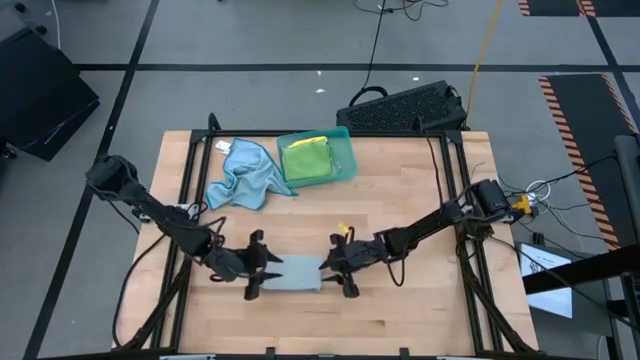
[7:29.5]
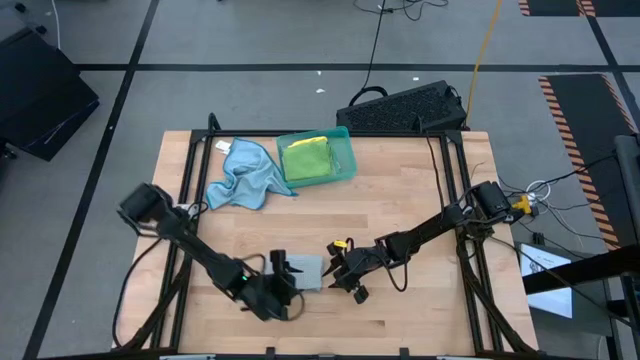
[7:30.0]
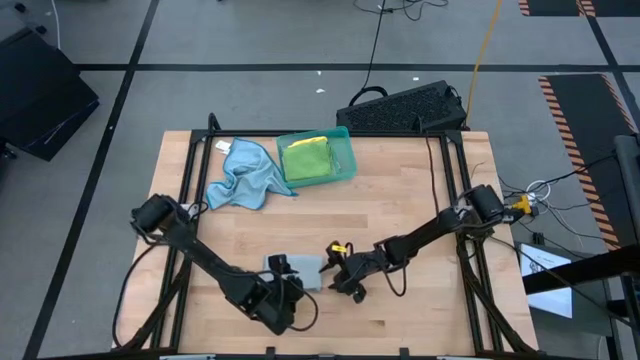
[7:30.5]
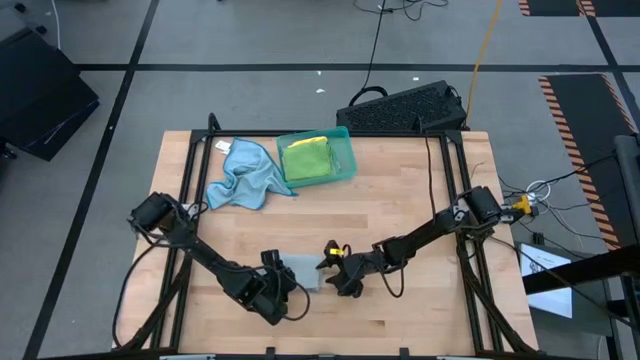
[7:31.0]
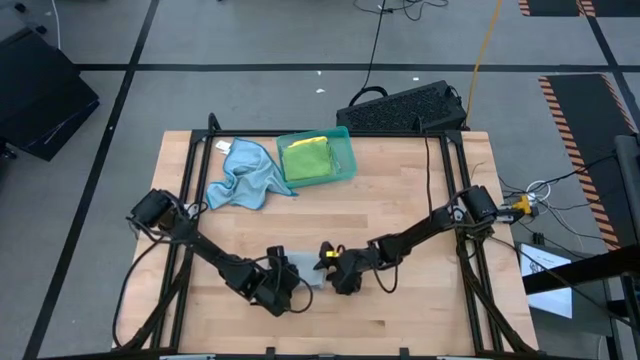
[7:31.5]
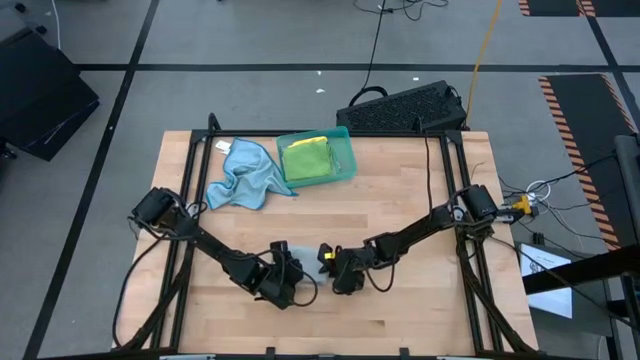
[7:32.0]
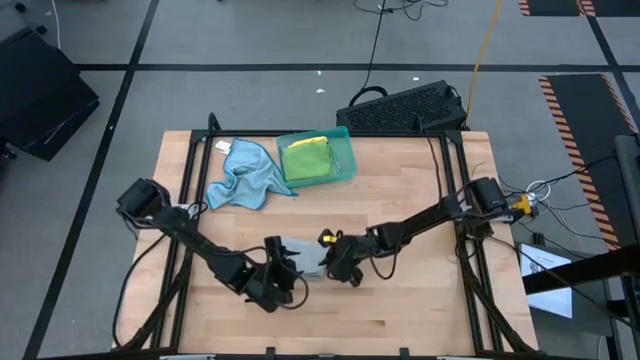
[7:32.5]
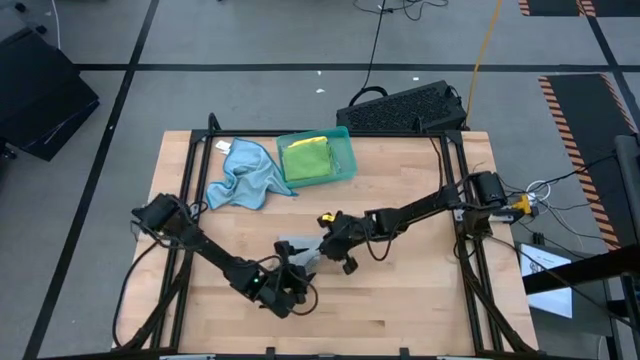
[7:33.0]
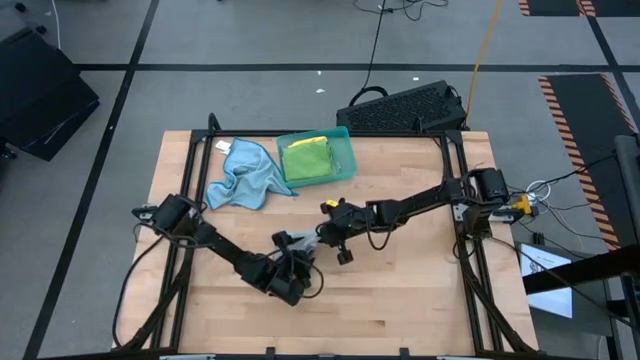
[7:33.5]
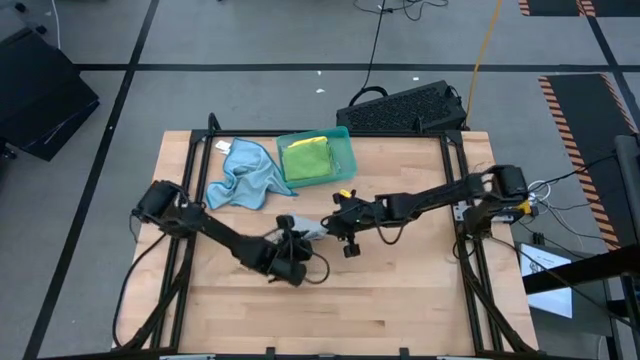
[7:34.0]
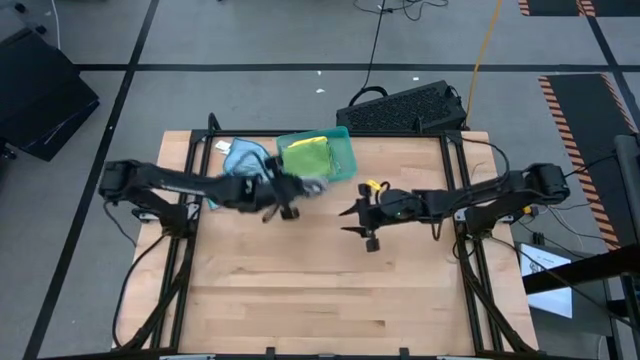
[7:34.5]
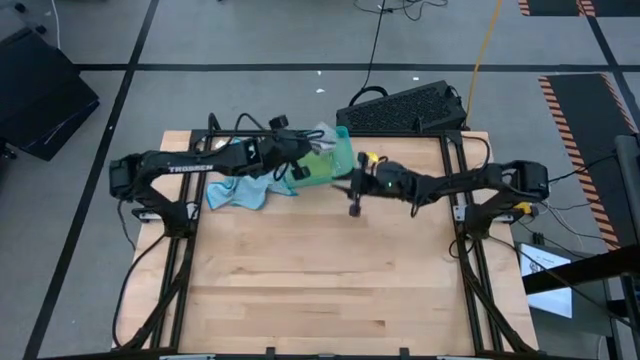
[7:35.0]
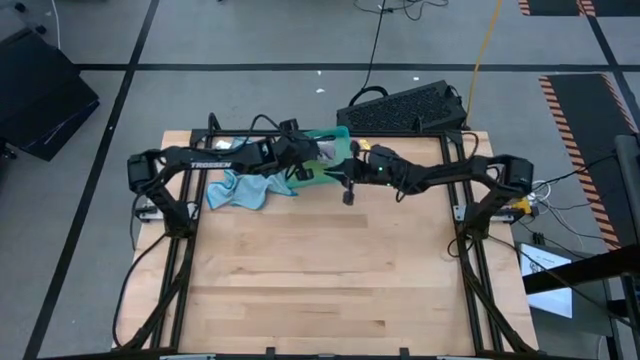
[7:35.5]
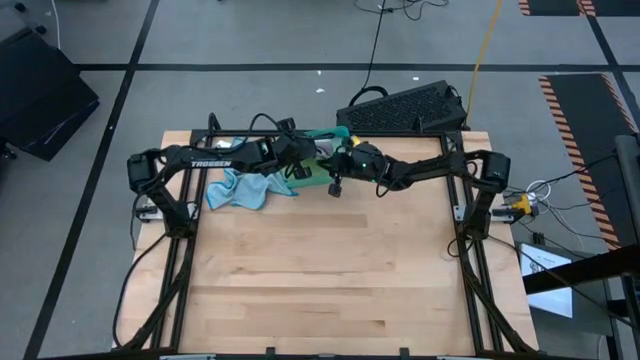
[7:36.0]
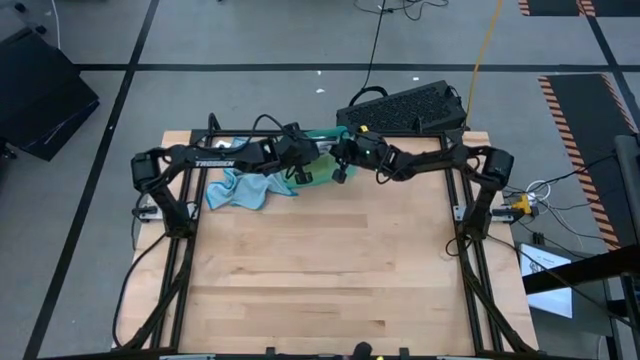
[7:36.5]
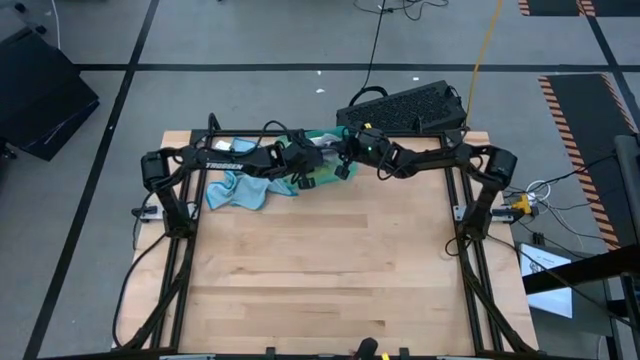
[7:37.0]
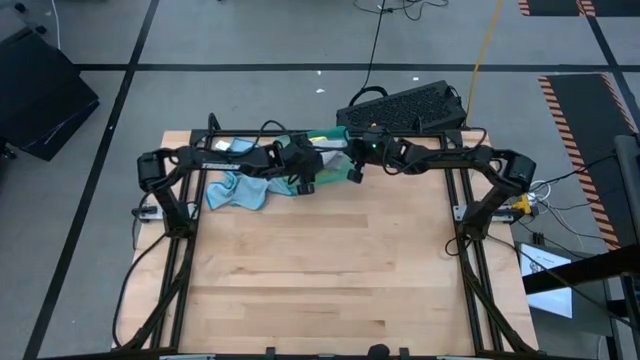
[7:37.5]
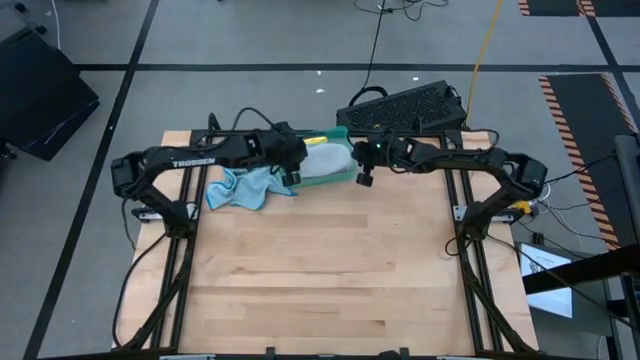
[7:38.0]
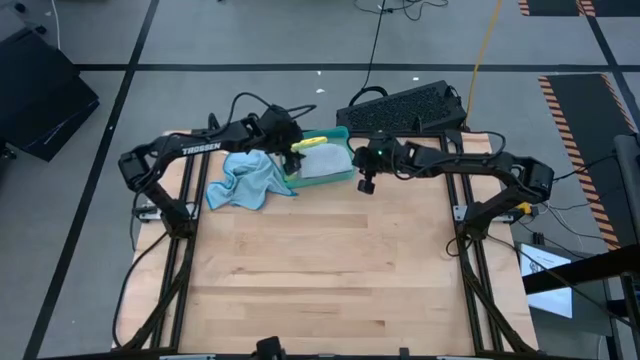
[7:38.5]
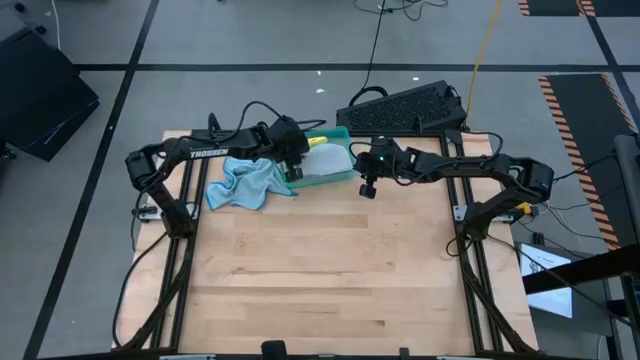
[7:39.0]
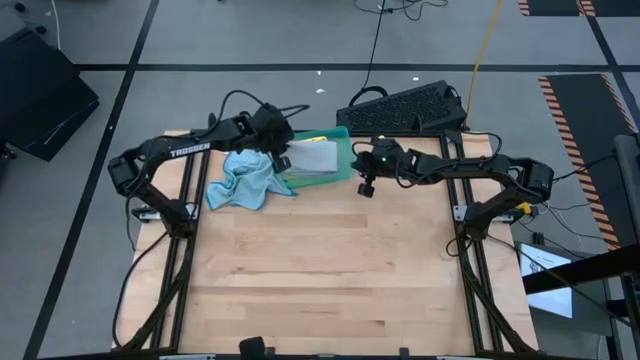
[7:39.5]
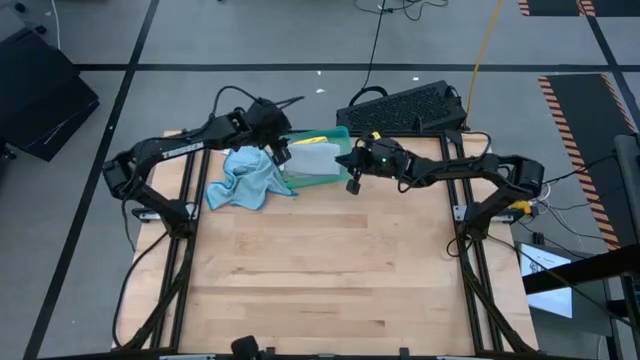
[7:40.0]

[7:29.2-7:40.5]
Task: Fold microfiber towels
Stack the folded gray microfiber towel on top of the folded green microfiber towel into the green bin

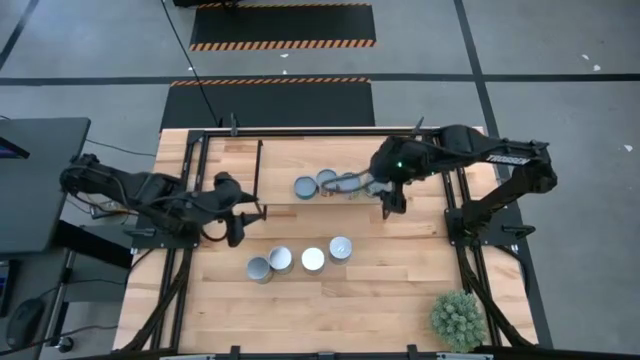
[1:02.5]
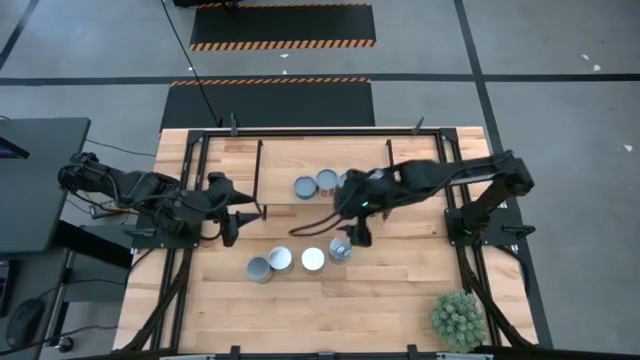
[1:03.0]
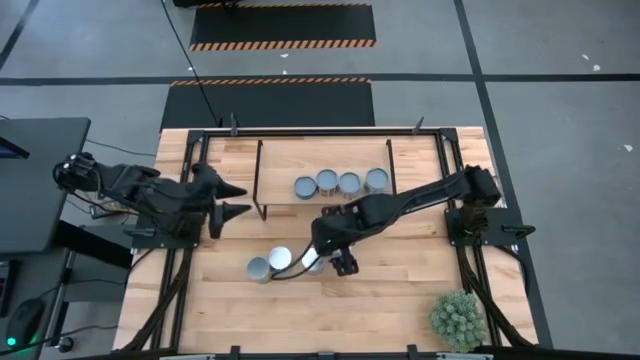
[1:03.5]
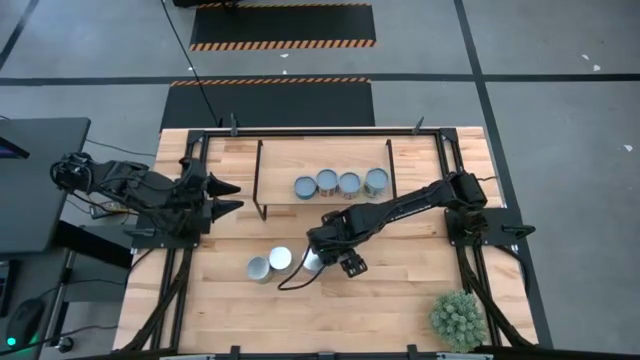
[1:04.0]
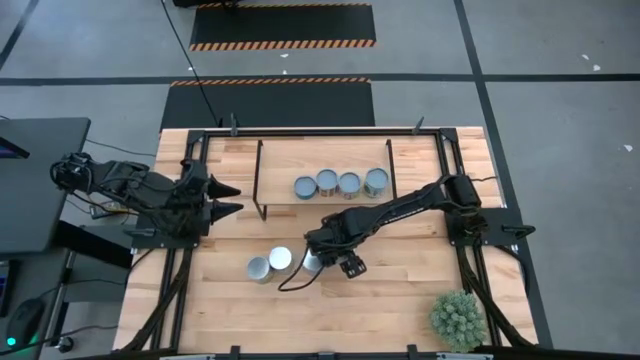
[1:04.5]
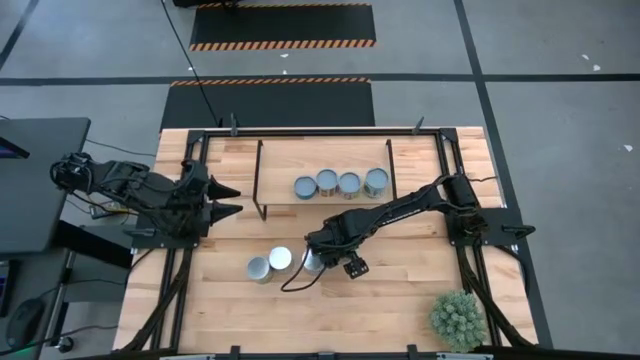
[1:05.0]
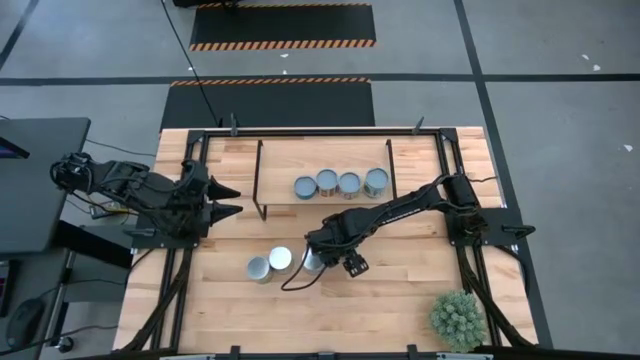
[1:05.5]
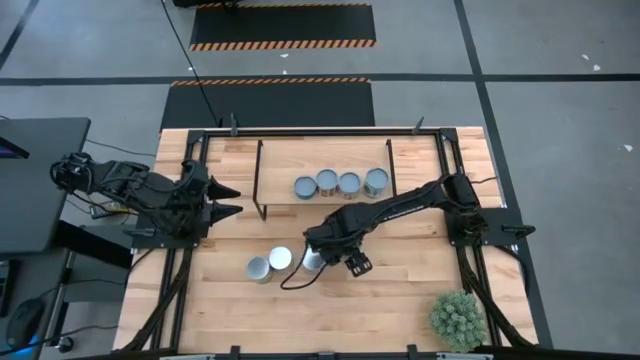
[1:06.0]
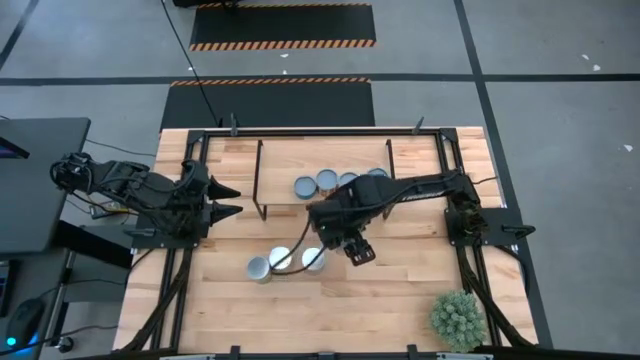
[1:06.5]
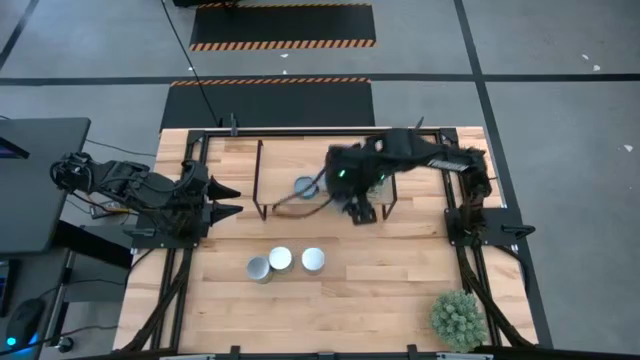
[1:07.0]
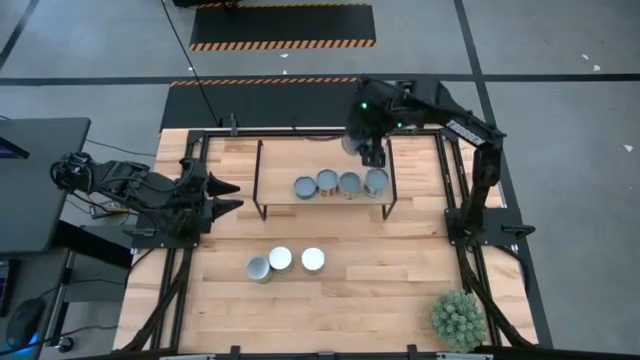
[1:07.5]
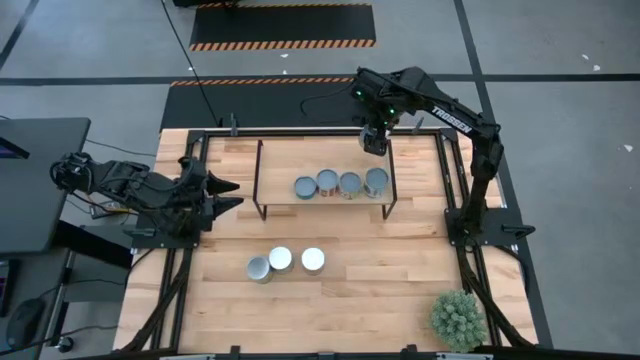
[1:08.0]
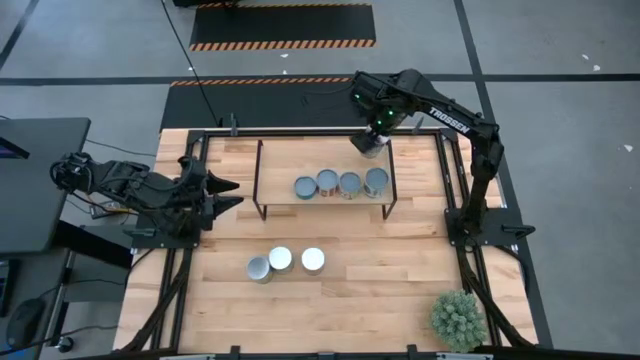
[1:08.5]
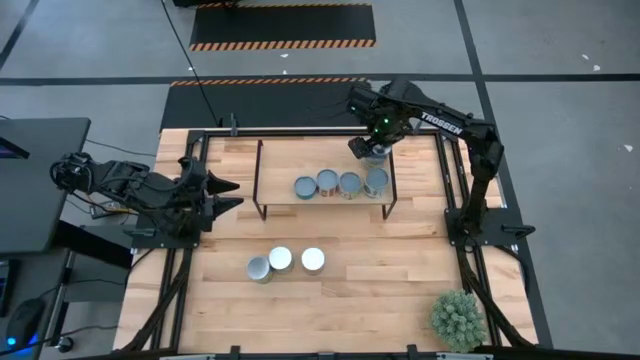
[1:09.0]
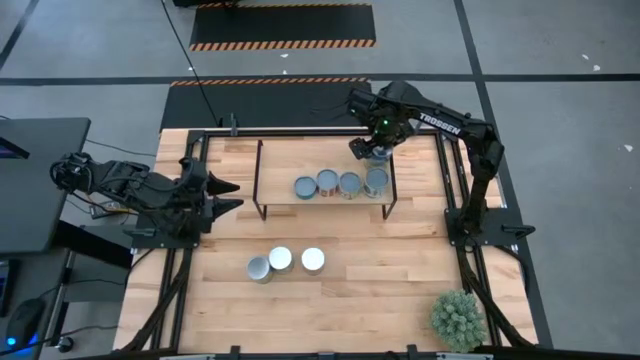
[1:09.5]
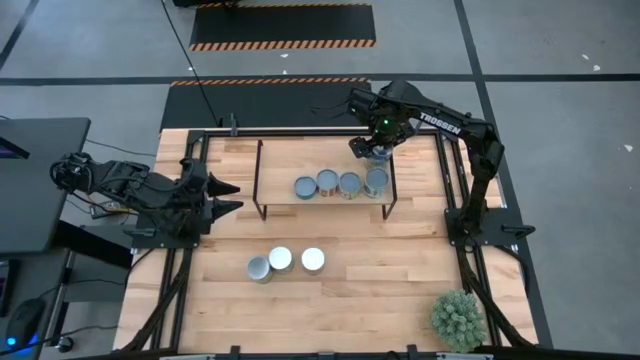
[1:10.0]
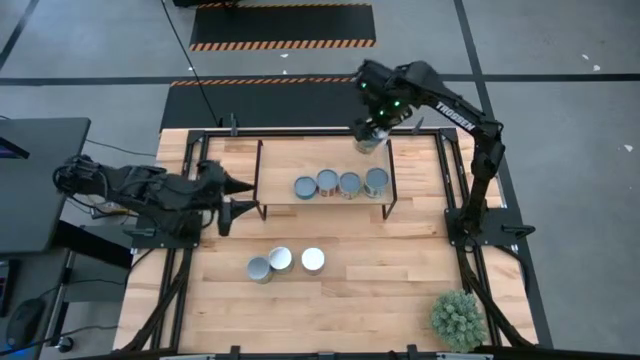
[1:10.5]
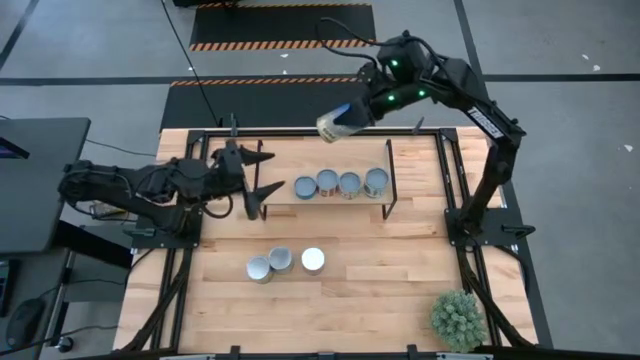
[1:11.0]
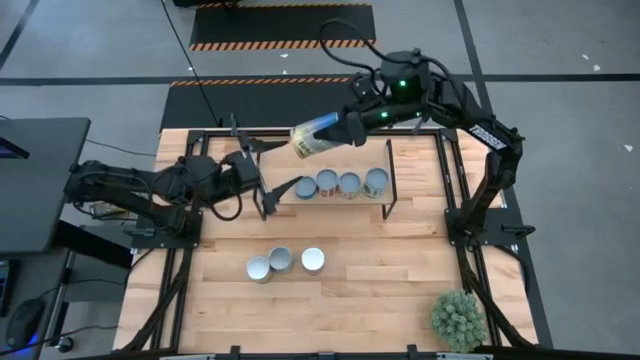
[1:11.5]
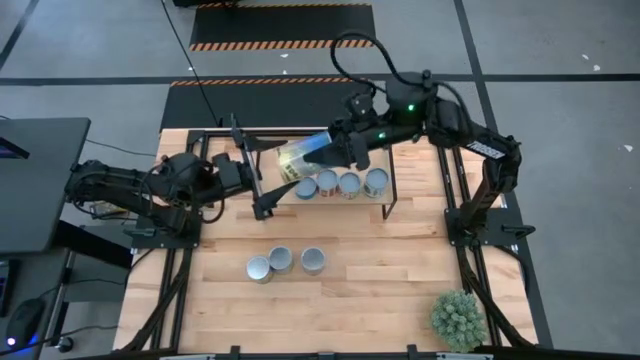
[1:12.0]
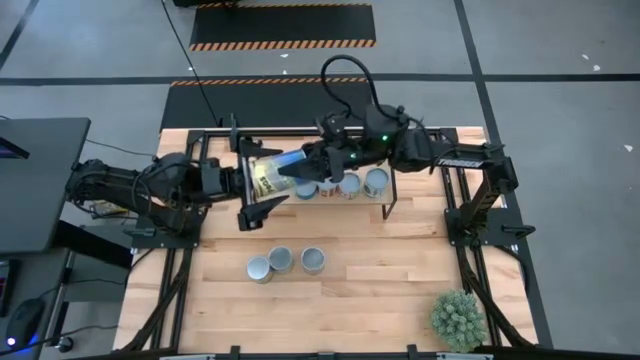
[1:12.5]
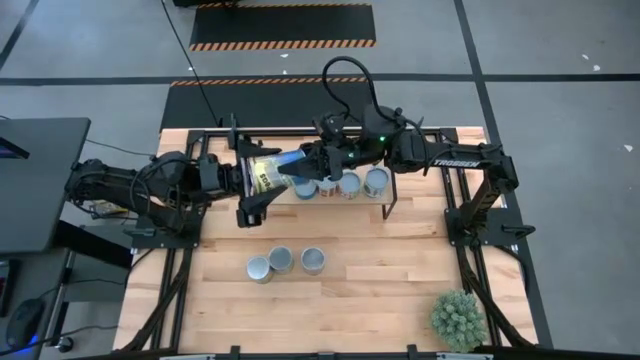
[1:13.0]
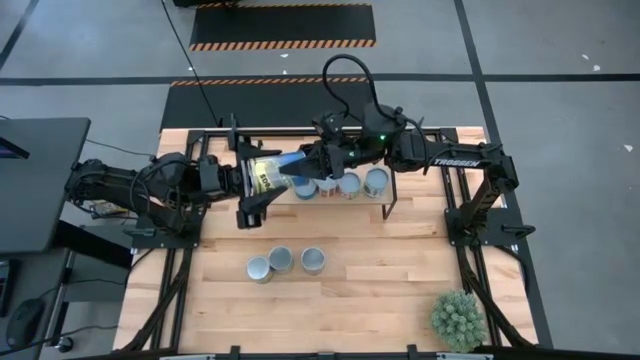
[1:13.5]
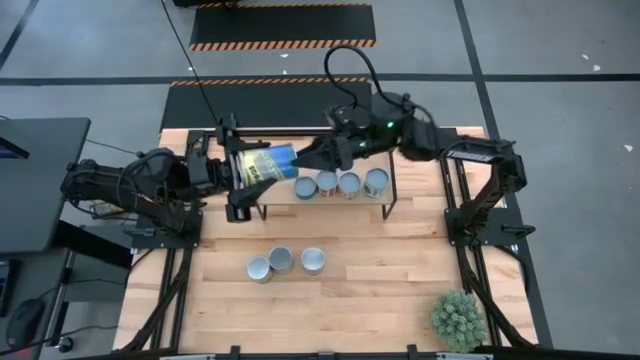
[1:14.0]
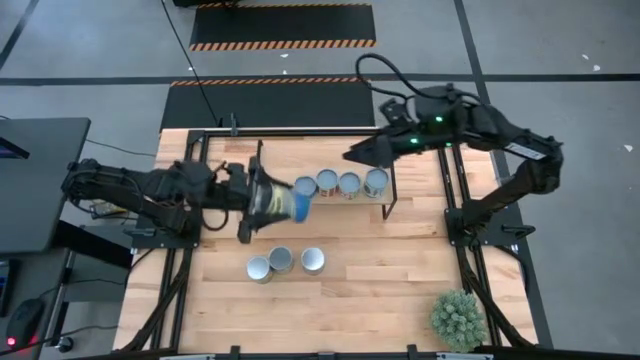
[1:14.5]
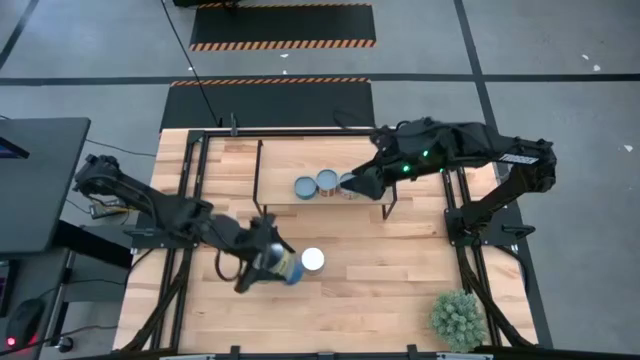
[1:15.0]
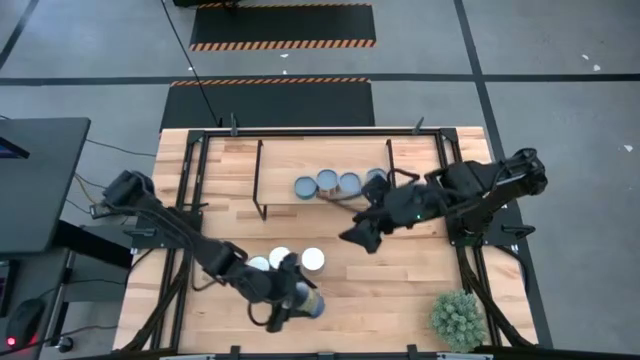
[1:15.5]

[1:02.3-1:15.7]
Task: Pick and place cans onto a shelf
Put the canned peas on the shelf
